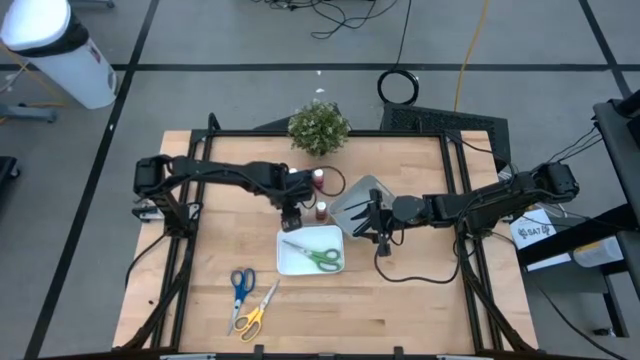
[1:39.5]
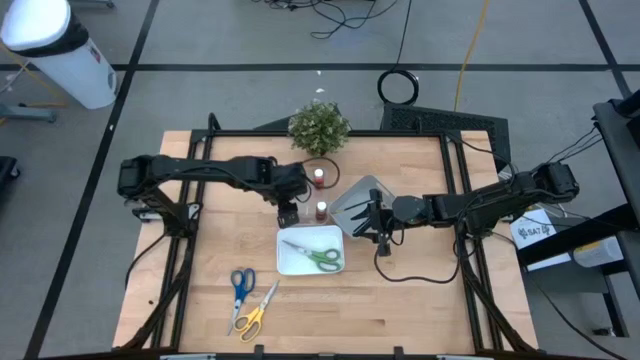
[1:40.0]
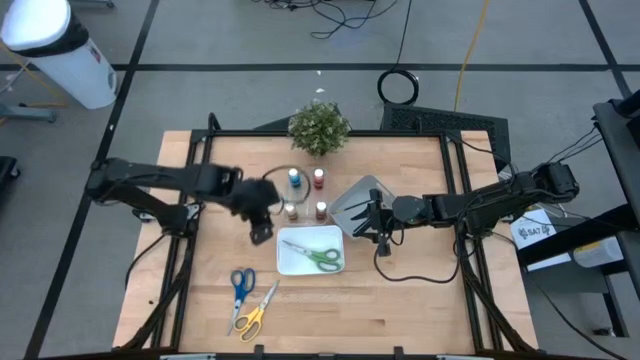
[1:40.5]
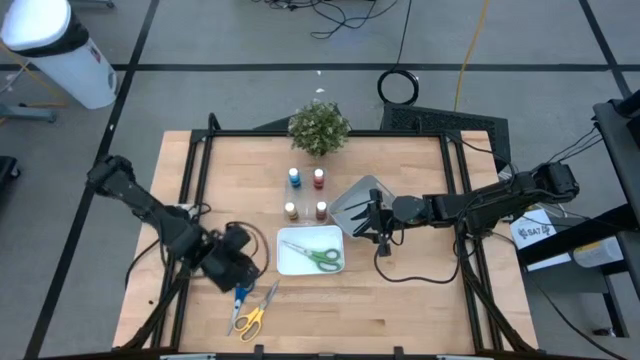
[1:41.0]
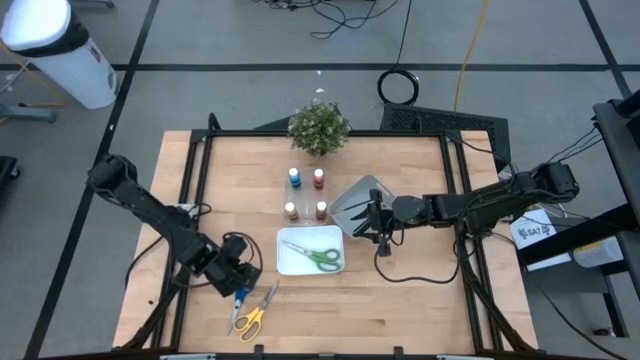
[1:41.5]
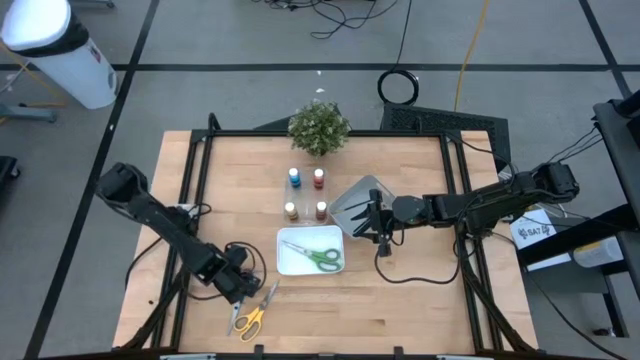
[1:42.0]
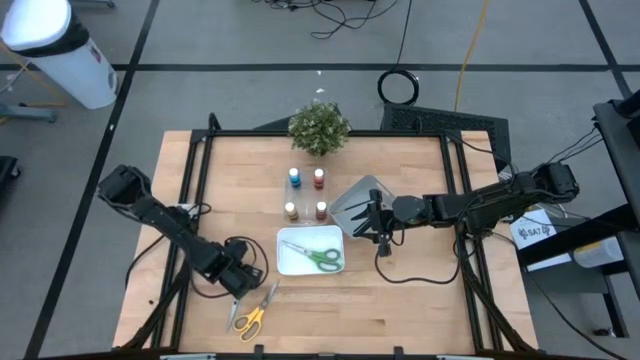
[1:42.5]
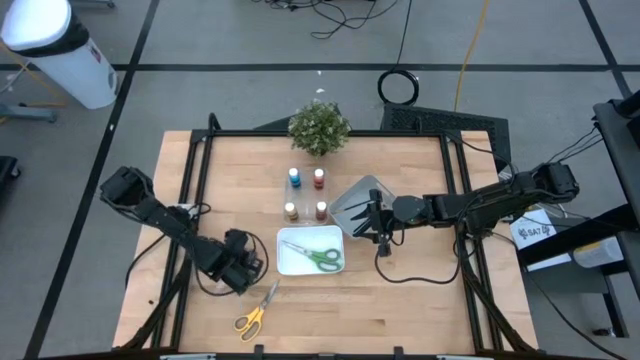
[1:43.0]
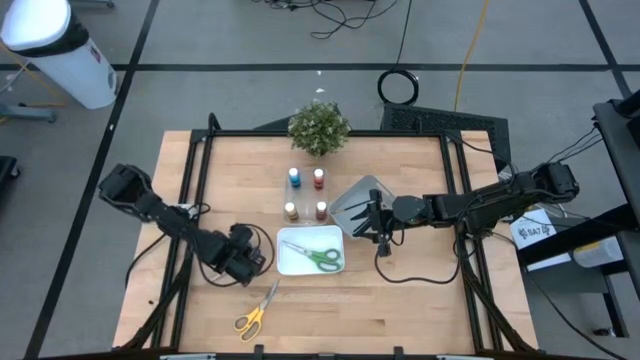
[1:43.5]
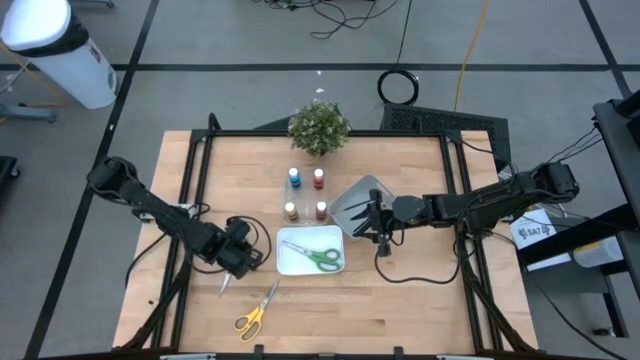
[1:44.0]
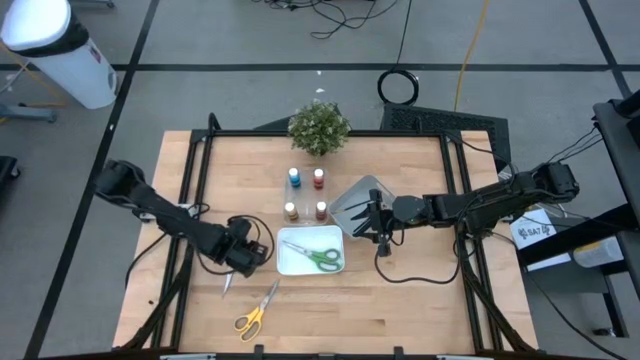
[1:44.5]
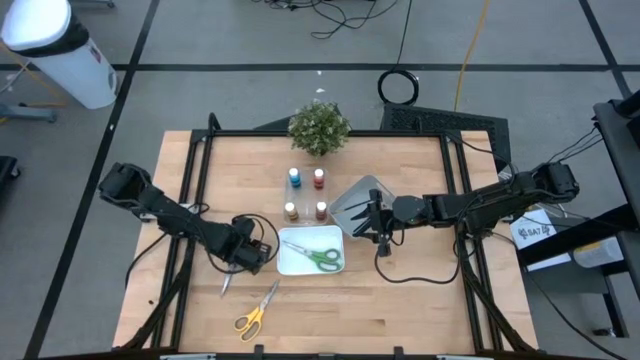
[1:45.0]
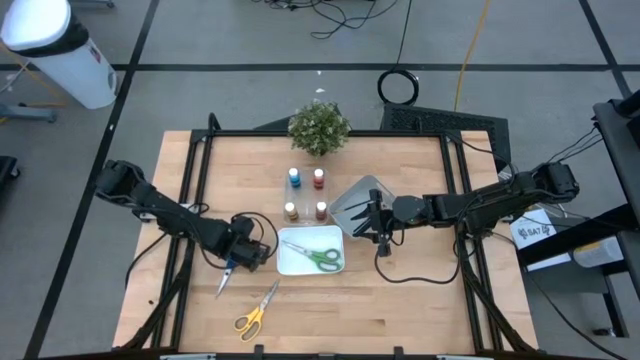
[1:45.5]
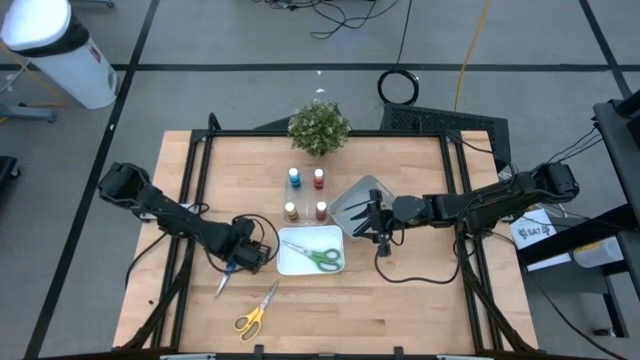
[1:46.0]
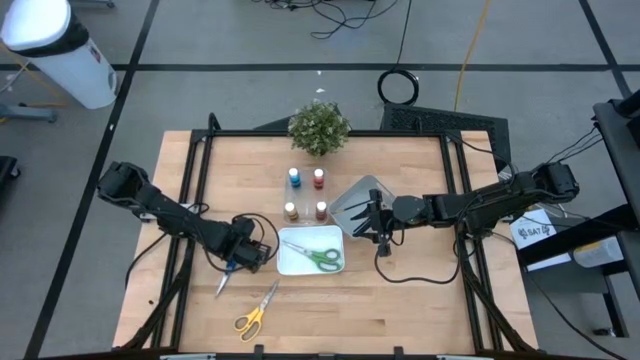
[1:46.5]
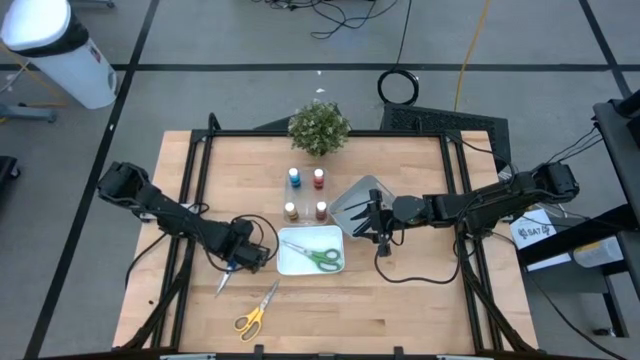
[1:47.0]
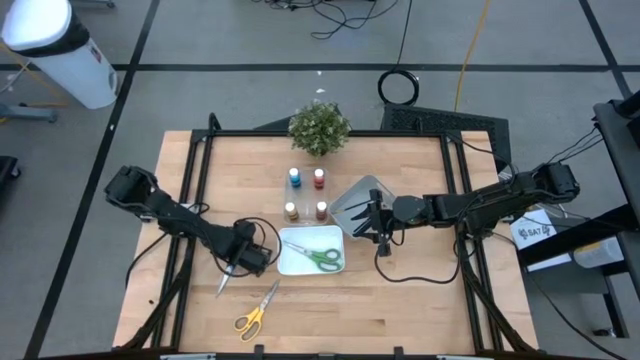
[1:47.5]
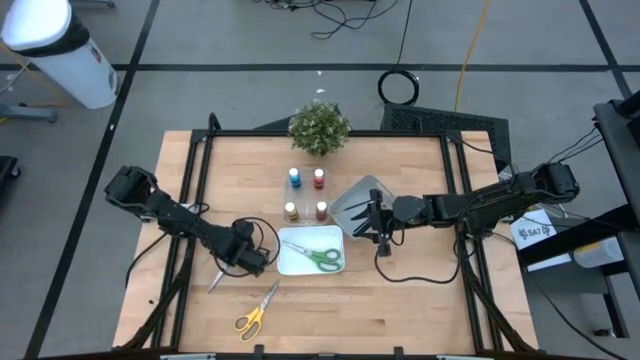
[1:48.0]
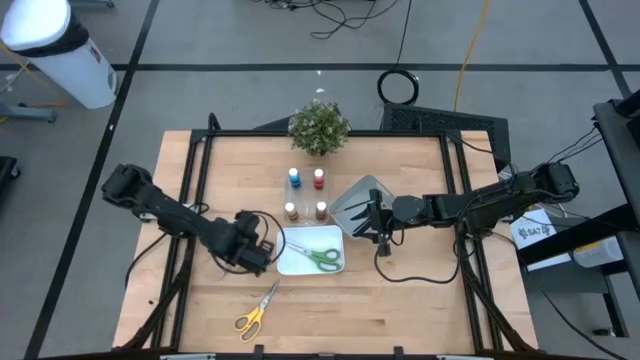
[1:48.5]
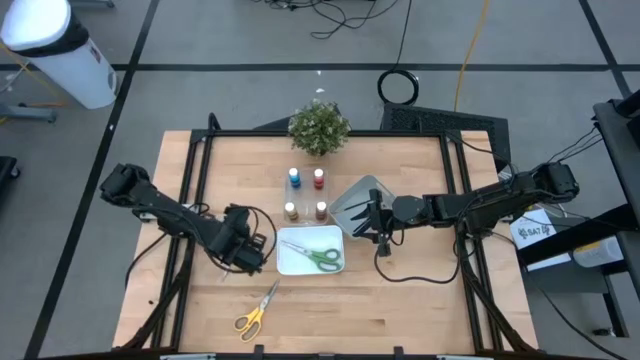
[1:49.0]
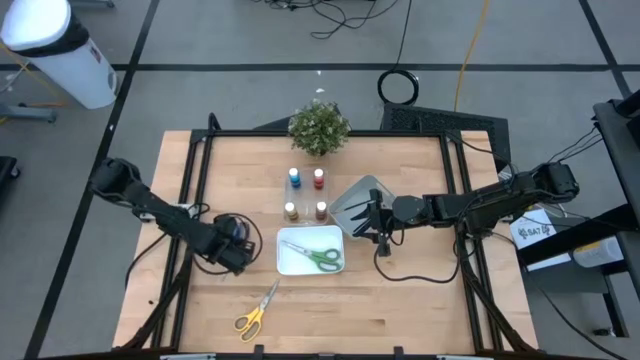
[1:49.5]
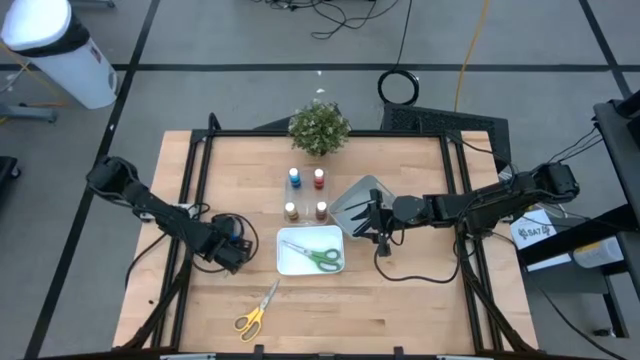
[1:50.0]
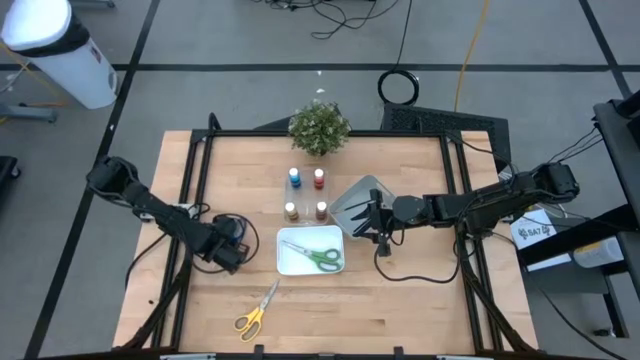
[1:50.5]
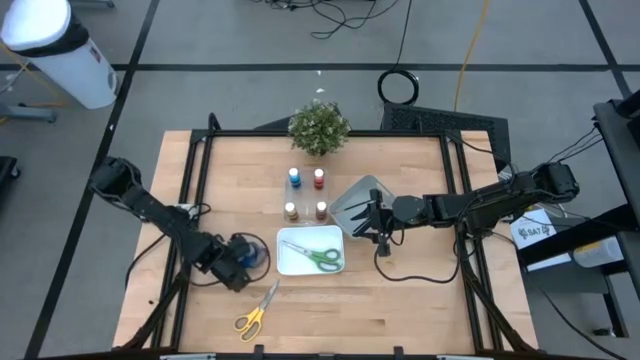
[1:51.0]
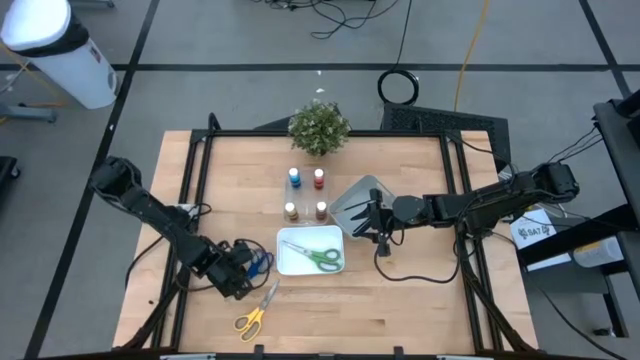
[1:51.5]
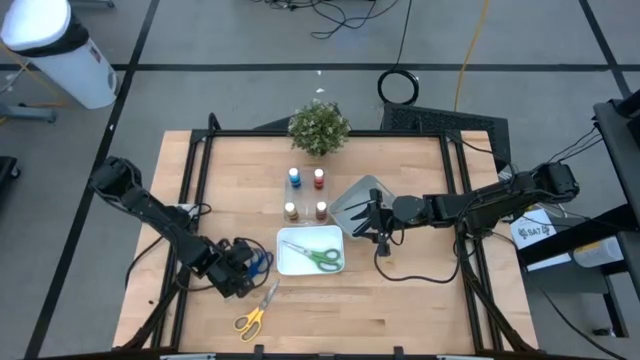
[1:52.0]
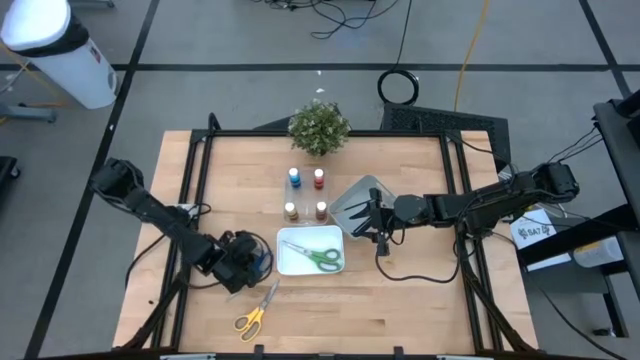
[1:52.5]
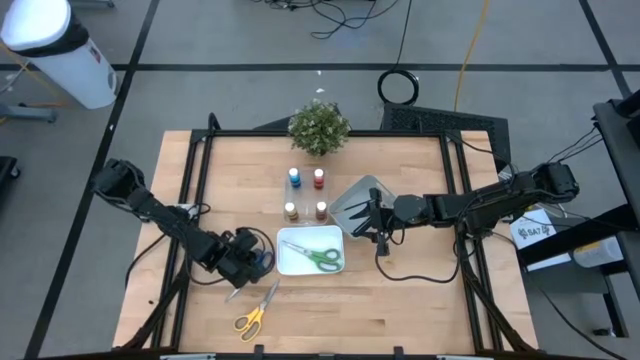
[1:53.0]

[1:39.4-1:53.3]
Task: Pick & Place Paint Supplies
Put the blue scissors into the white bin

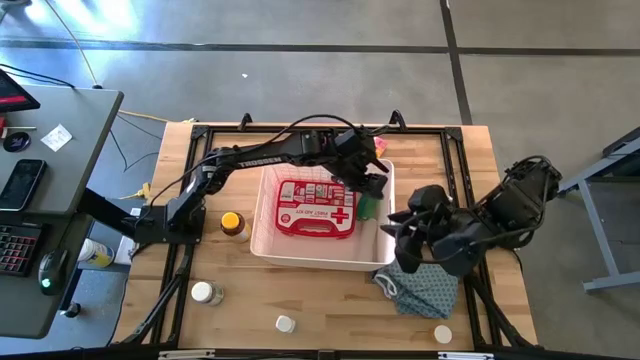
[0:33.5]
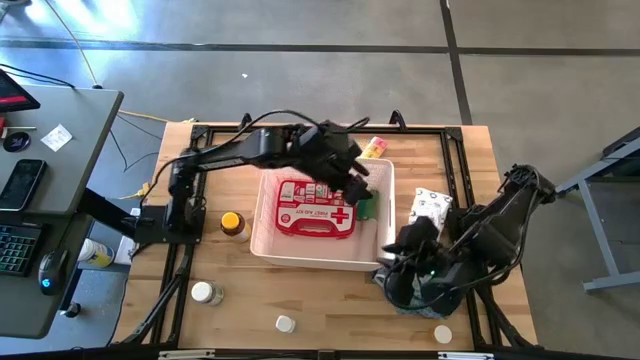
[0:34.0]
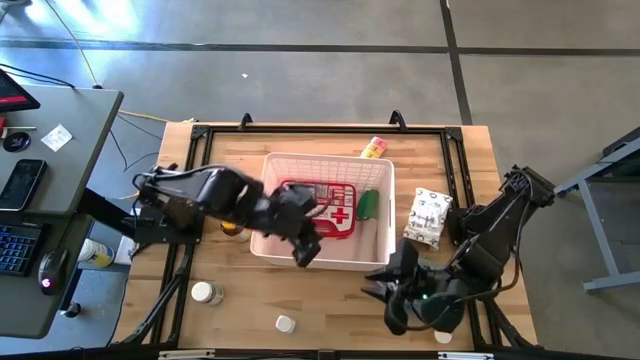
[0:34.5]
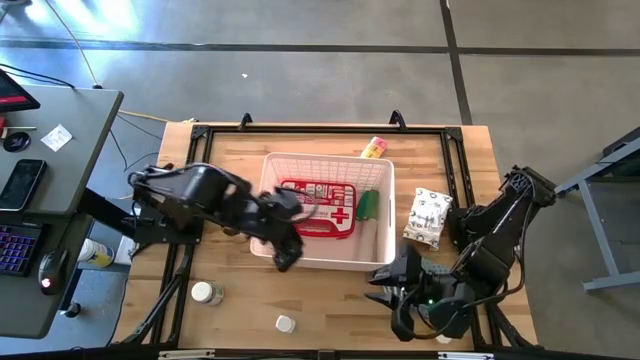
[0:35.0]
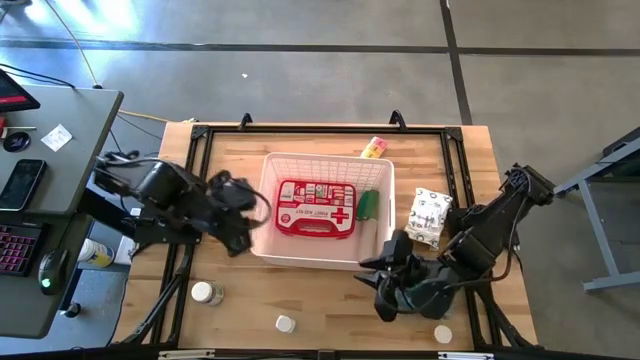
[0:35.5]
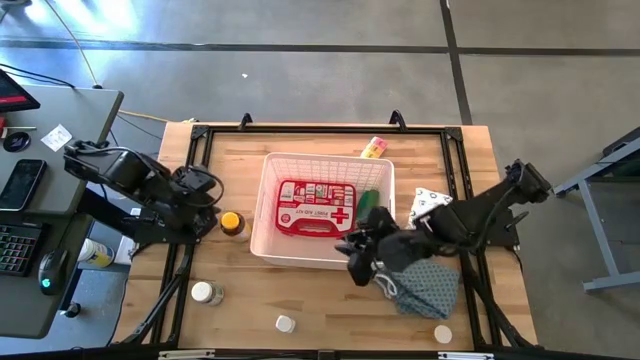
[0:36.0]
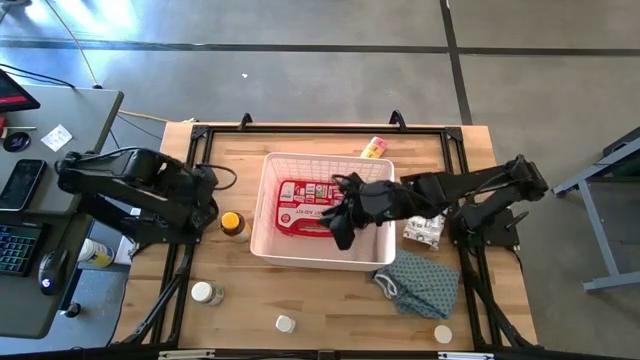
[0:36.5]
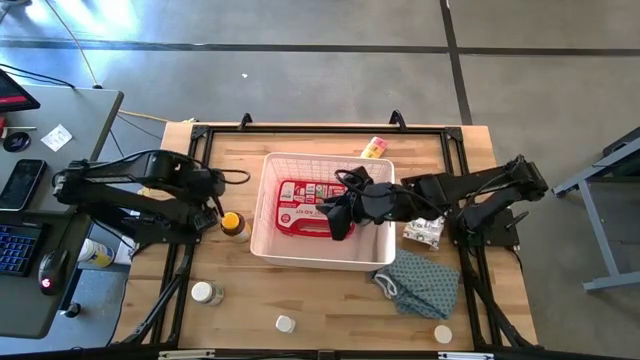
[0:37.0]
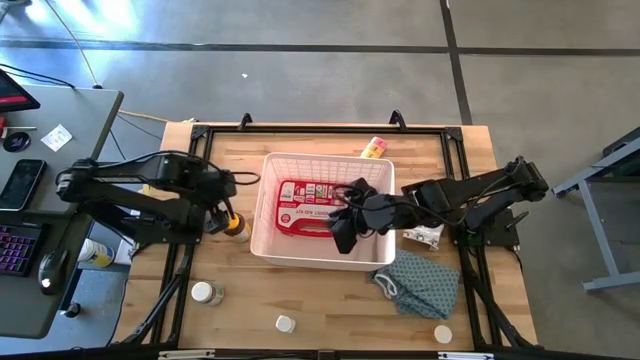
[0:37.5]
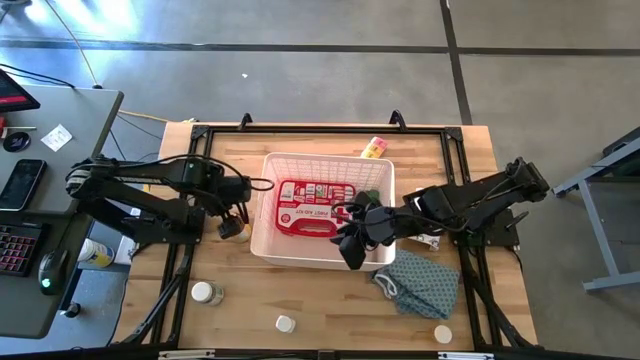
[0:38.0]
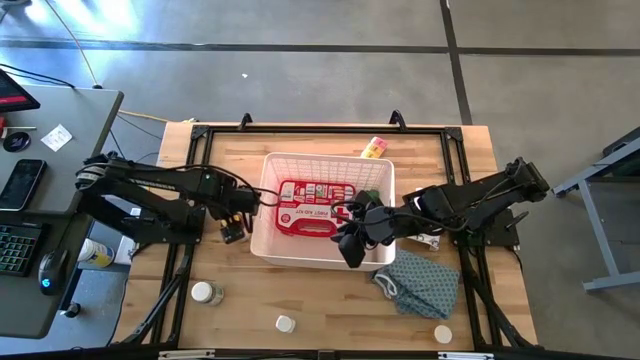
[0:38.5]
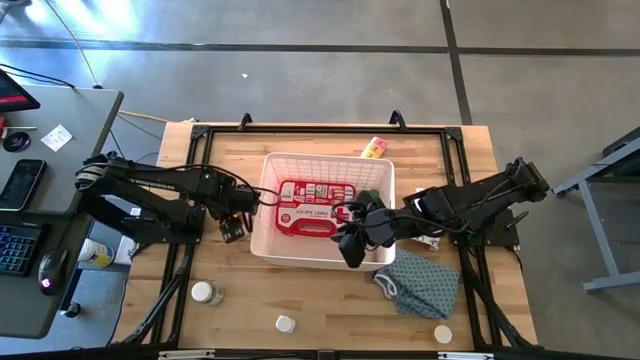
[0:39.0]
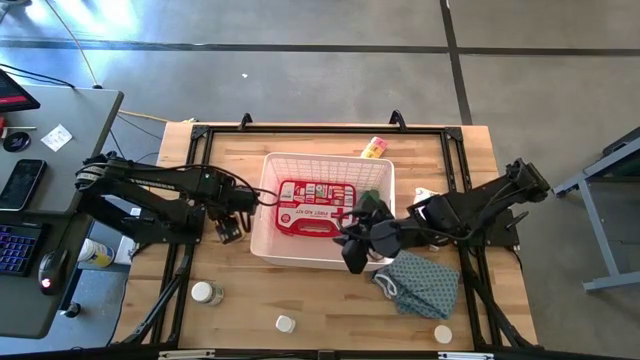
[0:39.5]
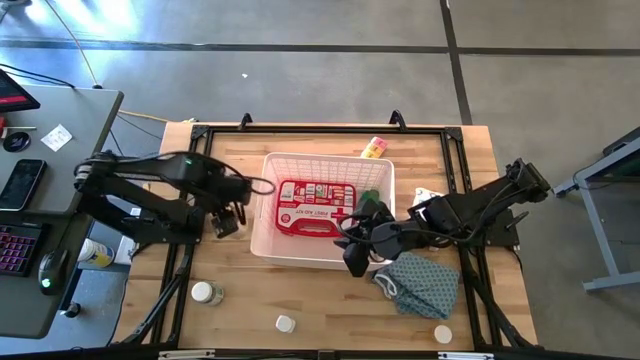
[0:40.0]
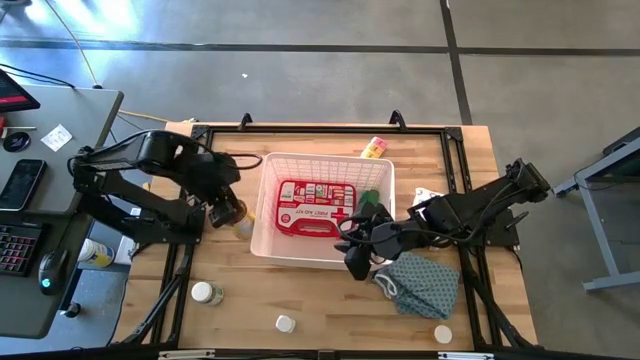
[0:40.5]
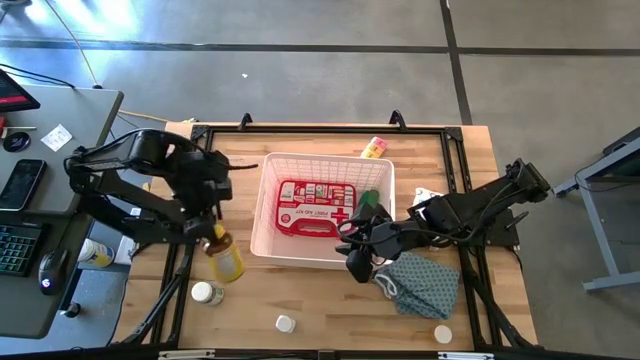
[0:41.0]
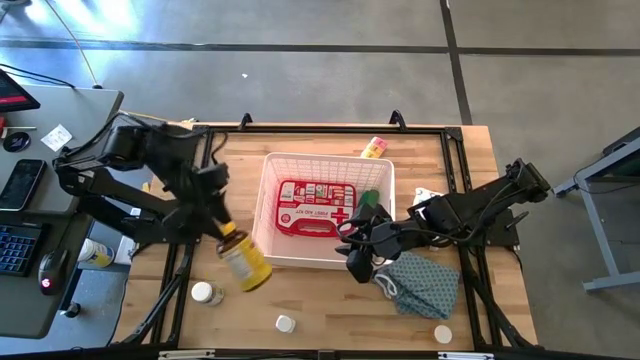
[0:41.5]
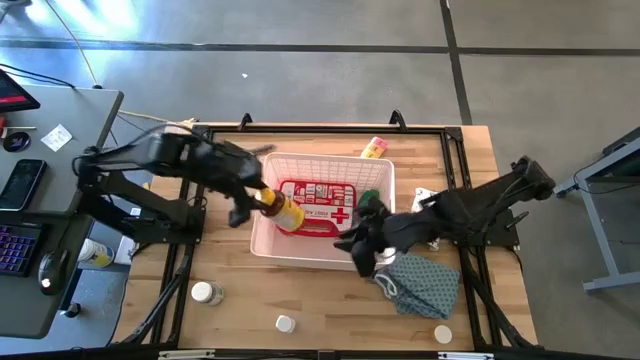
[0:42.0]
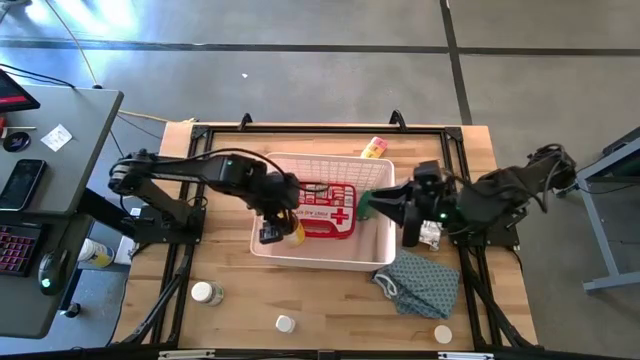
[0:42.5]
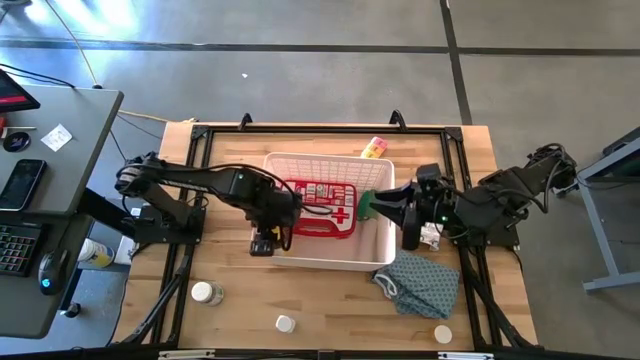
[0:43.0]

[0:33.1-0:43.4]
Task: Pick & place medical supplies in basket/bin
Put the yellow pill bottle into the white container
